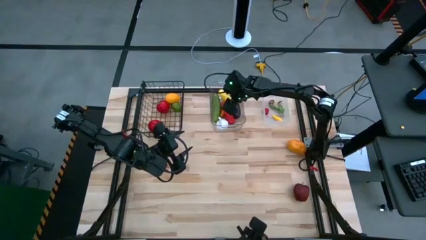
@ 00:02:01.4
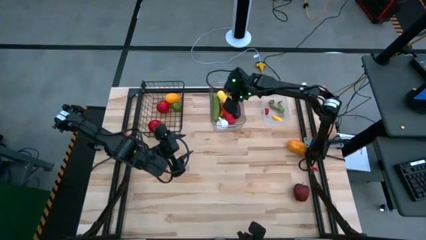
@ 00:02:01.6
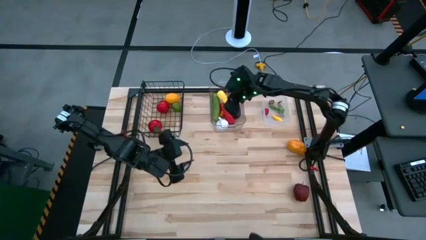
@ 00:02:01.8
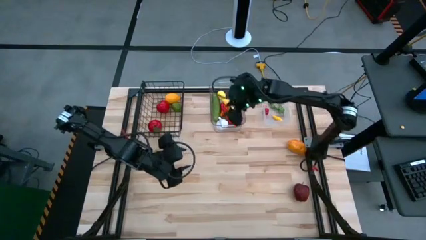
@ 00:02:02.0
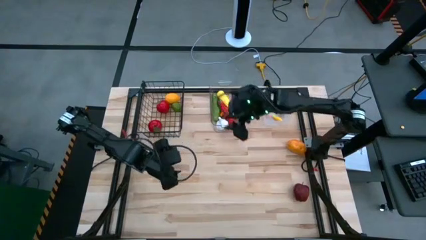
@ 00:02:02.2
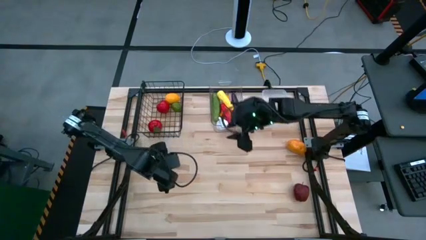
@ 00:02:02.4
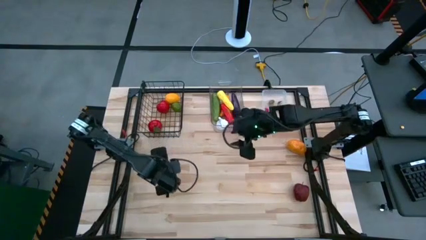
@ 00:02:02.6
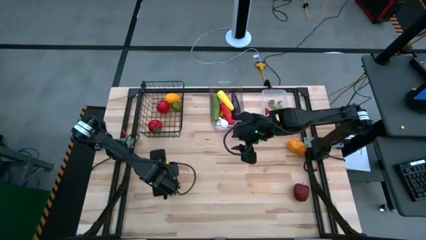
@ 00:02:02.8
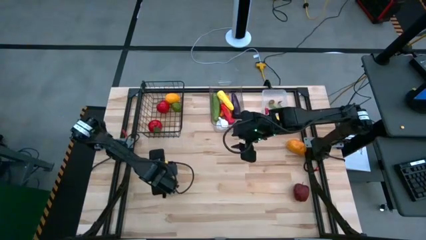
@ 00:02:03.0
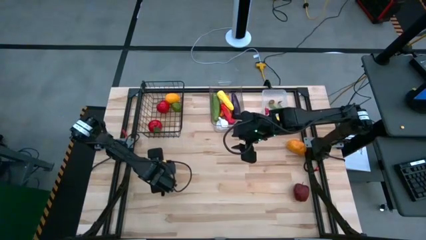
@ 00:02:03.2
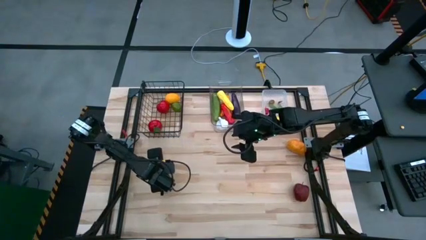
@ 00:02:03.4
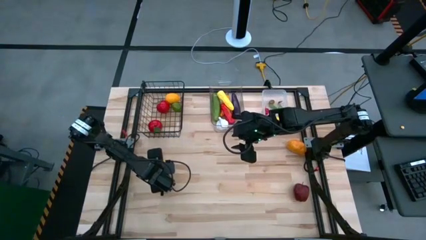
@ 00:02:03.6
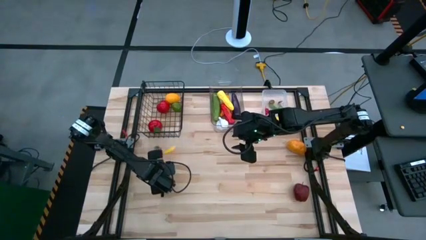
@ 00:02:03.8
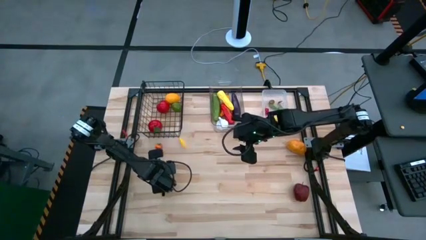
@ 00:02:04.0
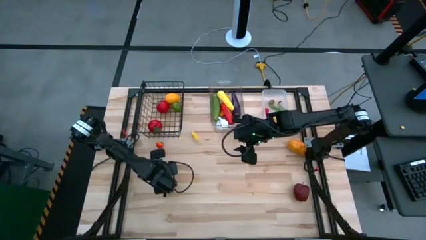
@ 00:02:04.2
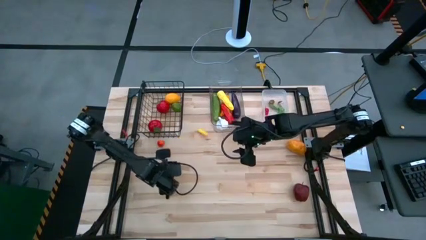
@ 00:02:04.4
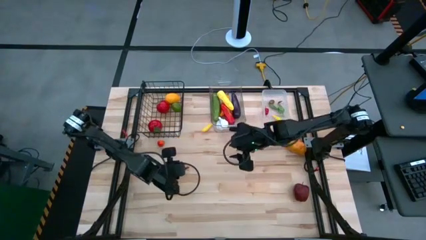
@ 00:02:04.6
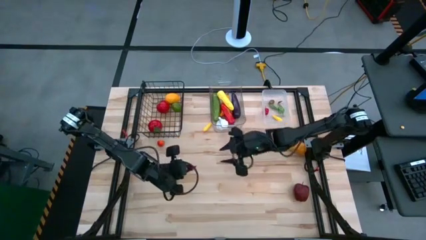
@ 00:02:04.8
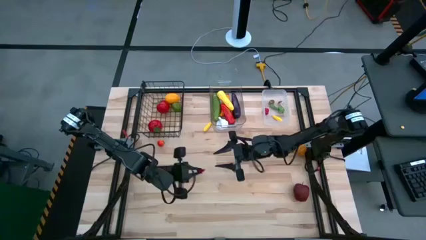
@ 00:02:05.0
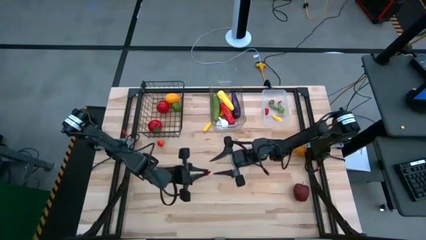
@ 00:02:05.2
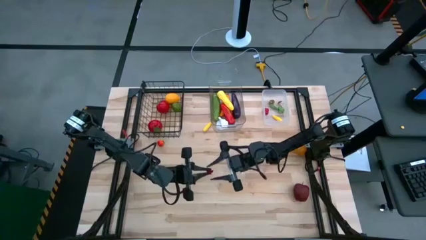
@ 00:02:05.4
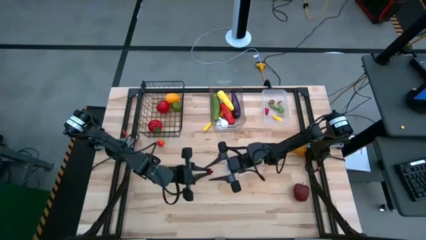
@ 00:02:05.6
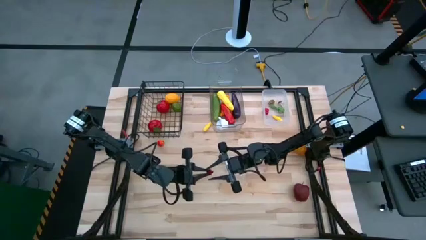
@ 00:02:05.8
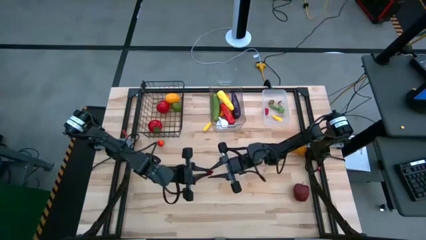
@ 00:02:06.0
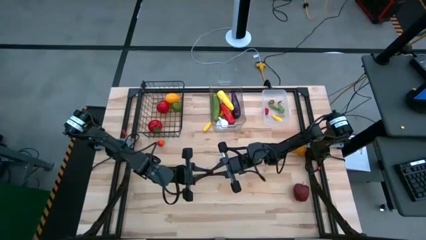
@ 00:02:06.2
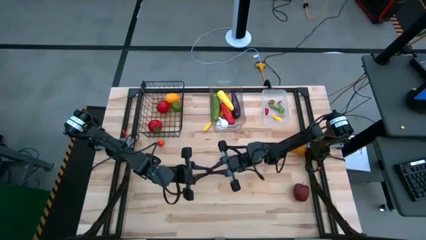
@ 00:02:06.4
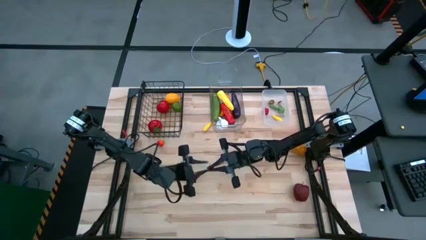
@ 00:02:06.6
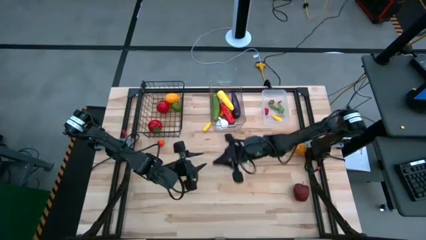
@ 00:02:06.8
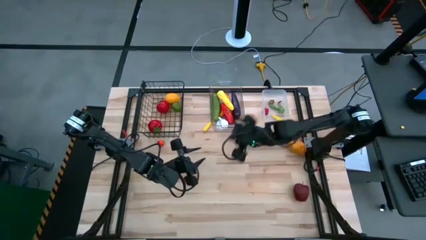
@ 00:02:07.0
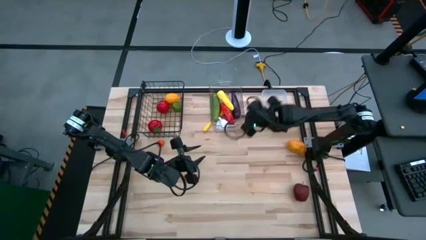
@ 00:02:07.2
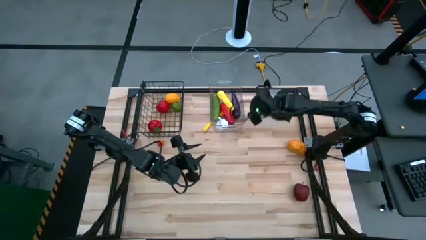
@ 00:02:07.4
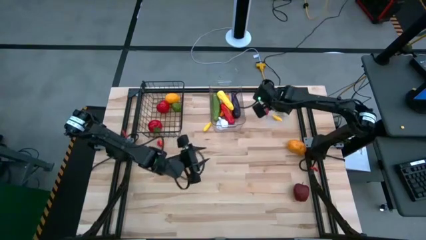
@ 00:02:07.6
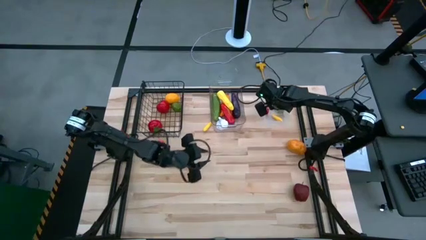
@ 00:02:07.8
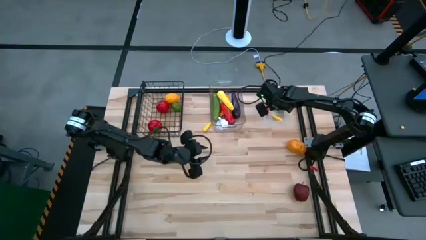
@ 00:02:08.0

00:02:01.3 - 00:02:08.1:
Task: Sort produce into baskets
Put the red chili pepper into the right transparent bin

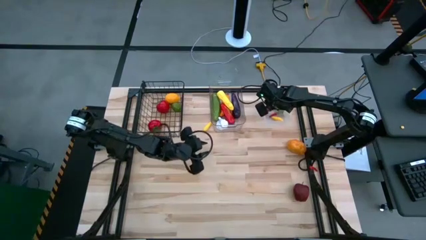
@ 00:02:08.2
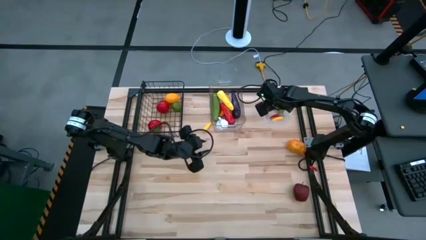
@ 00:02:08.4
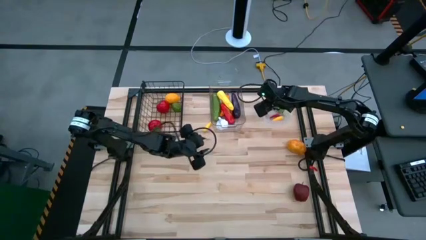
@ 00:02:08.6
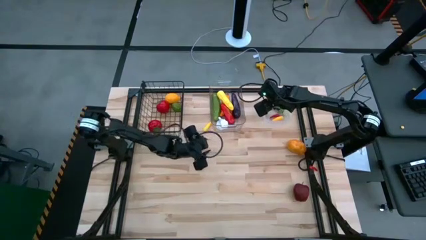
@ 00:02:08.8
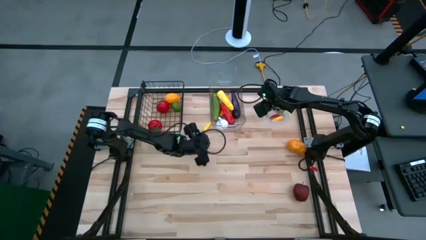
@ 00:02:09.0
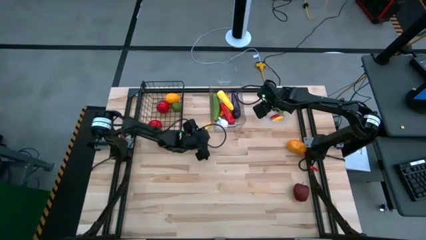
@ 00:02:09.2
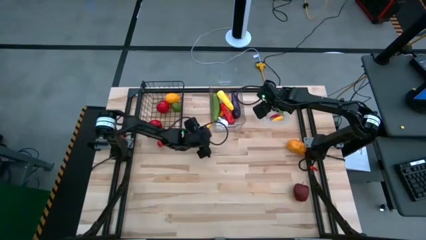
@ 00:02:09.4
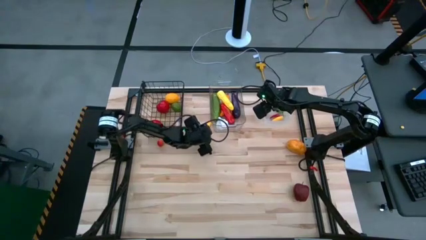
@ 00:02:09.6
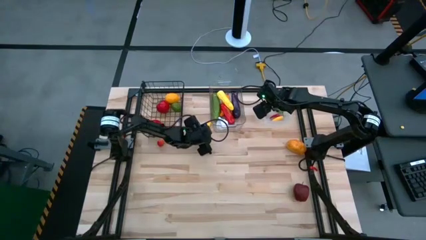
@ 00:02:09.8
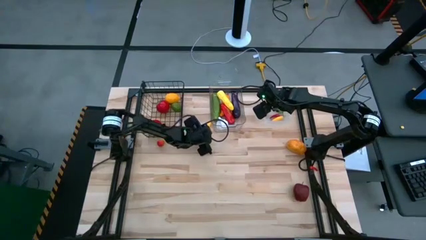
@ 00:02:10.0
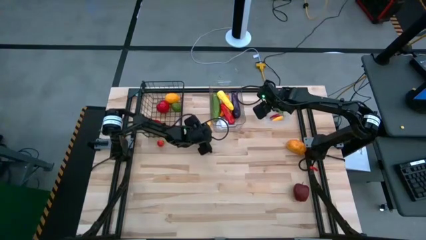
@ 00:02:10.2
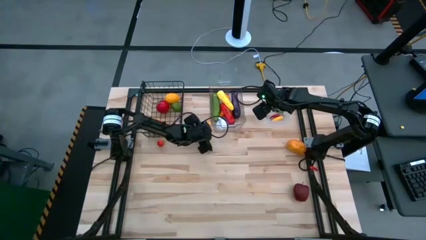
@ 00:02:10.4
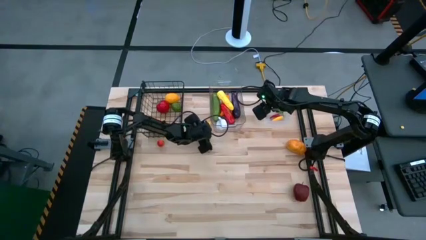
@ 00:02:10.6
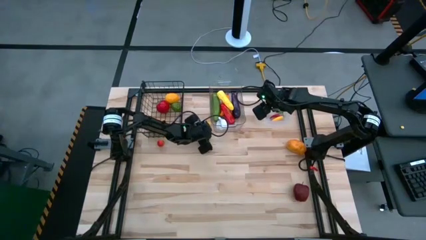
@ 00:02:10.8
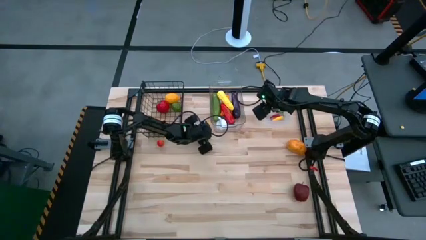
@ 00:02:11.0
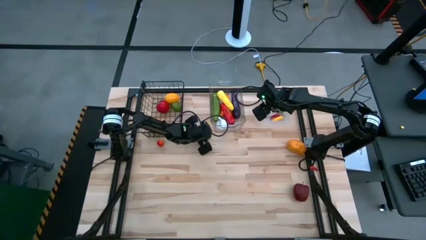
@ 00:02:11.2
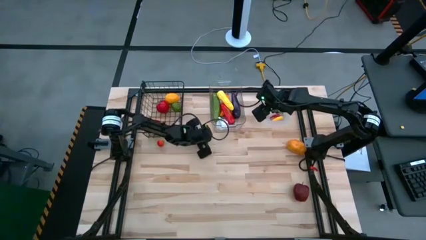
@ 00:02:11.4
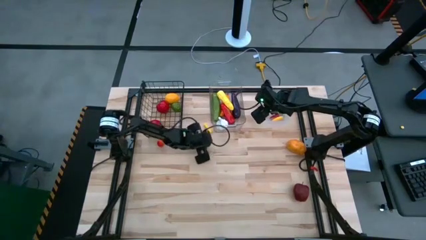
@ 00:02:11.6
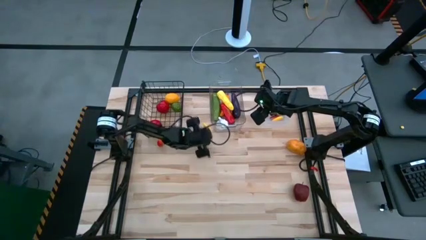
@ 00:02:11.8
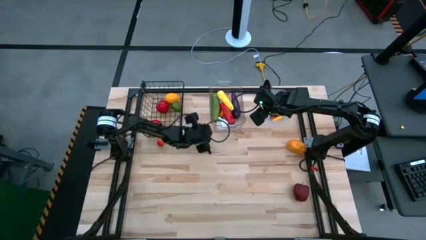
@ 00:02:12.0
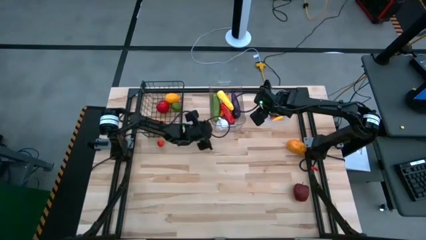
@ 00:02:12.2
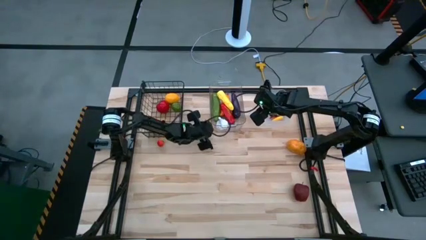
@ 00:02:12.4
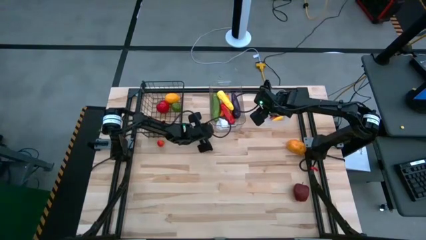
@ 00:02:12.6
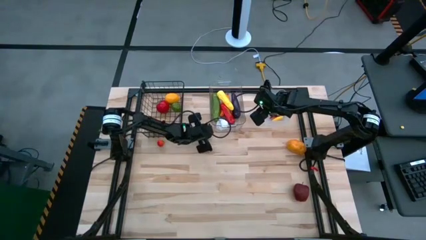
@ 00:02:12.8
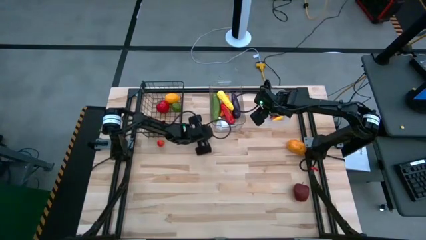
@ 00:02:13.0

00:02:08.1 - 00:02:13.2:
Put the yellow corn into the right transparent bin

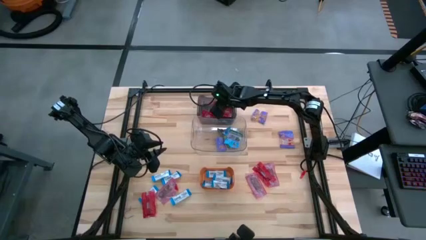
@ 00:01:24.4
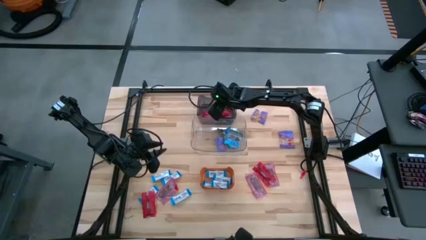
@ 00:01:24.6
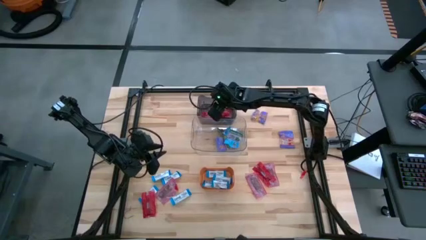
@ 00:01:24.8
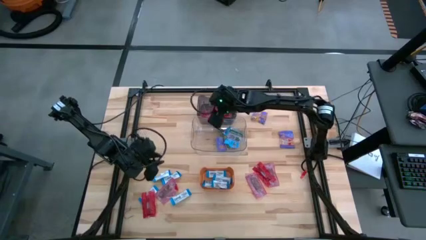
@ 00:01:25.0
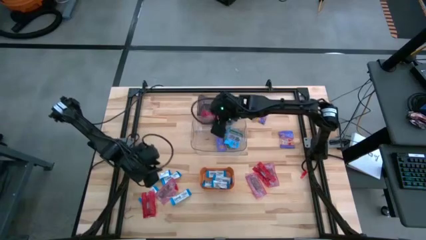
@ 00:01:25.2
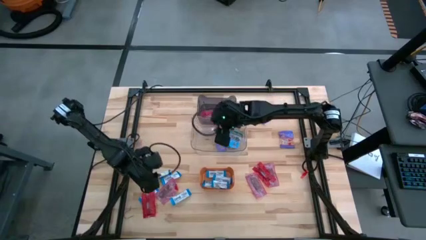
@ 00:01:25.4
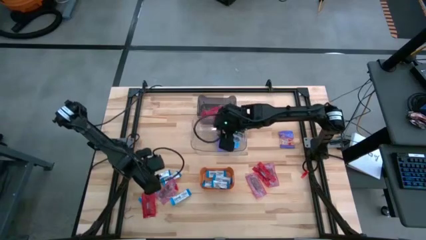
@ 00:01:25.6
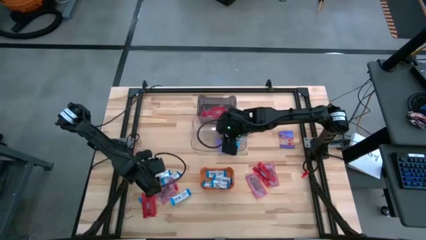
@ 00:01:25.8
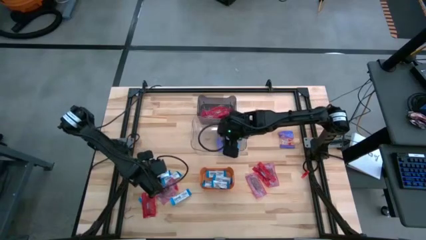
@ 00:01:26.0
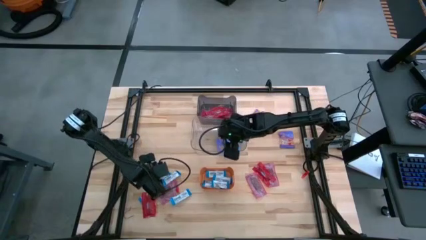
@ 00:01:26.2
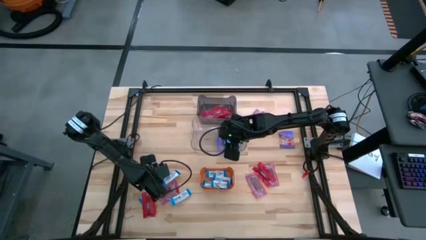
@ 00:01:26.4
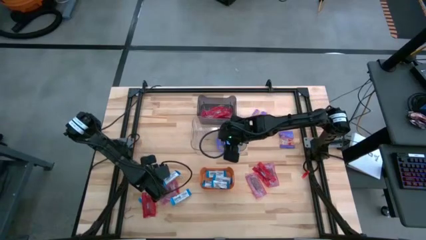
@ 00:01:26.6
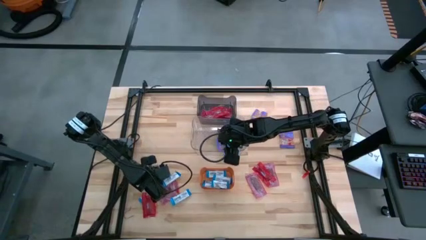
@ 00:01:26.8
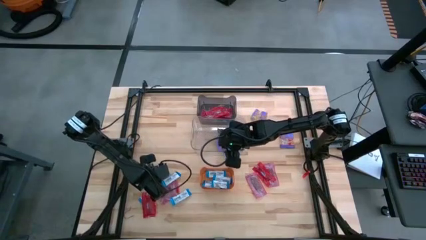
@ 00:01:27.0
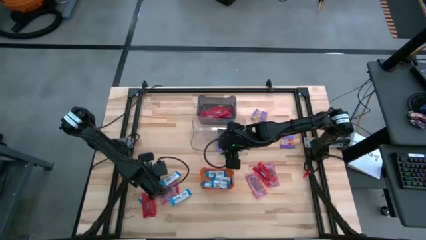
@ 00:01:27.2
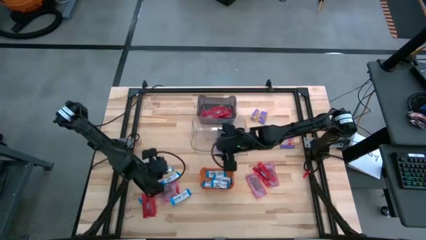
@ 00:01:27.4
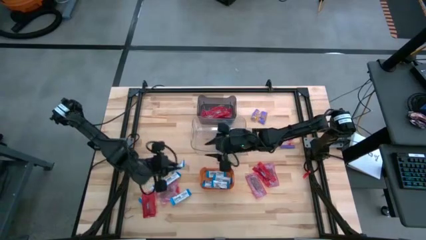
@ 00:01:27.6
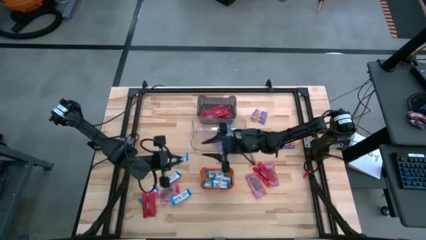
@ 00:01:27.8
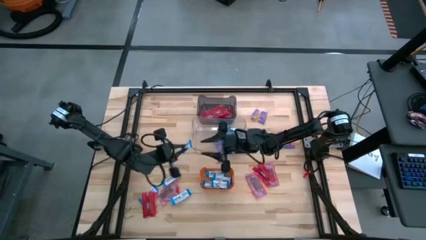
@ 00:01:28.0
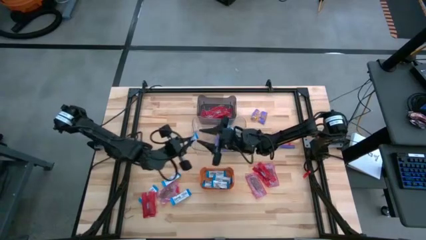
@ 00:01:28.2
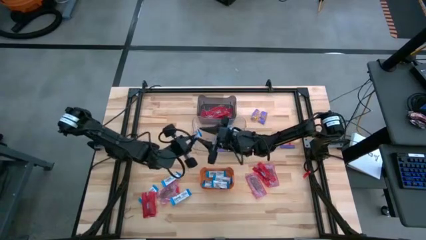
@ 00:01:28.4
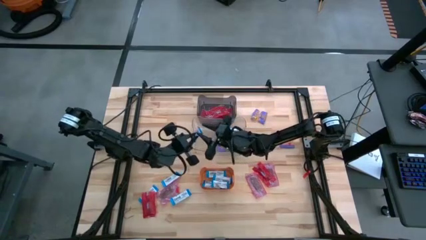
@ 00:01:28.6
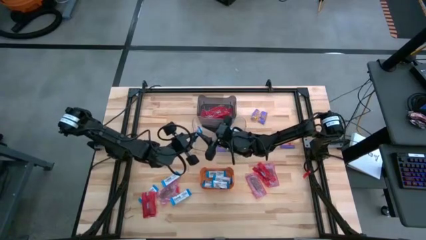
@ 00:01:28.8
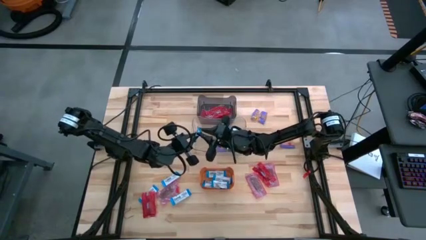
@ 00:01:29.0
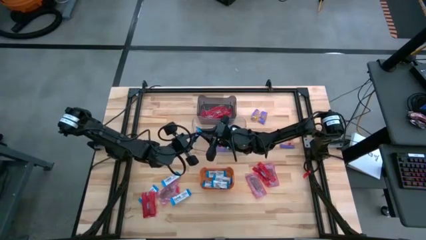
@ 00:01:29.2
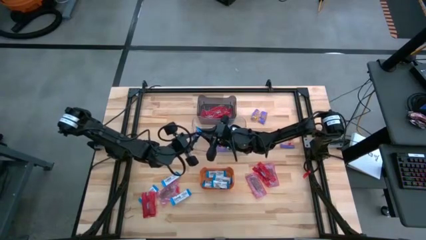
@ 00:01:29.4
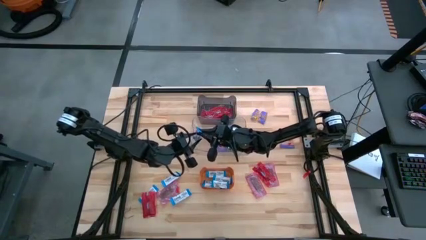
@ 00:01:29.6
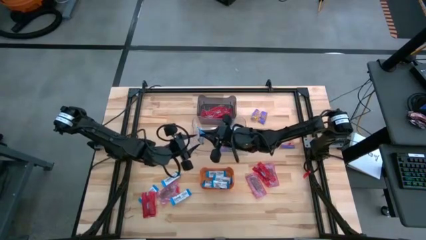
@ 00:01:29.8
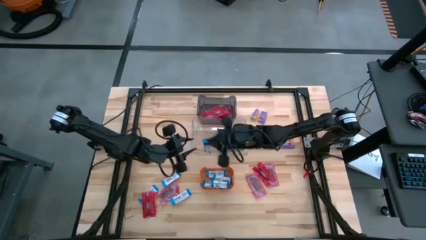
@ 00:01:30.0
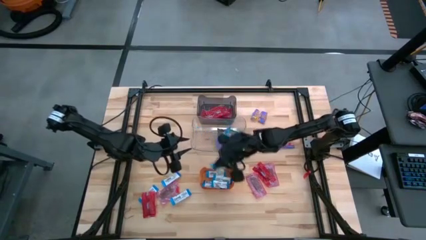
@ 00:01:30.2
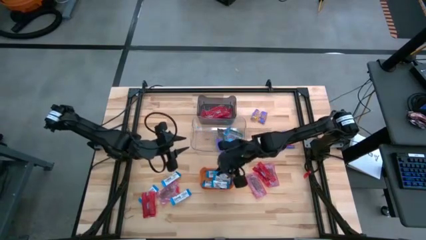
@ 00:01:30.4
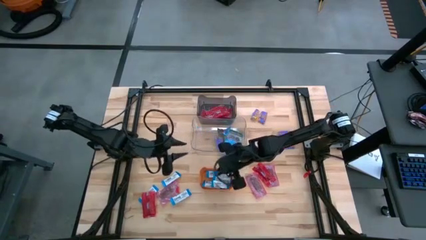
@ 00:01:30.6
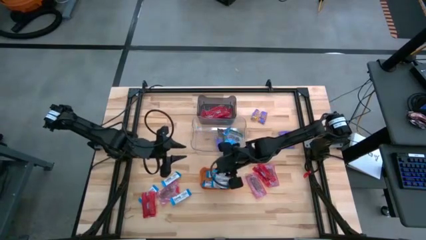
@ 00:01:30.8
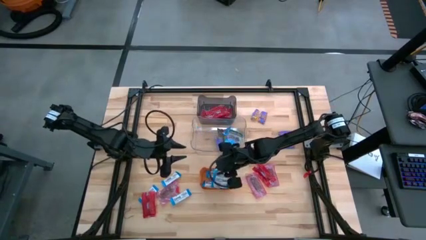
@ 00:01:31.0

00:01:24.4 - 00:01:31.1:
Task: Sort candy
Put the white chocolate bar into the orange bin
